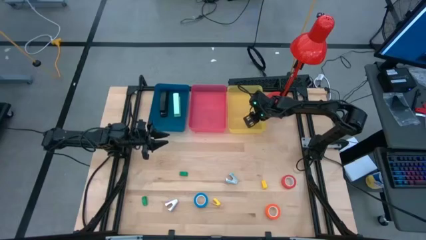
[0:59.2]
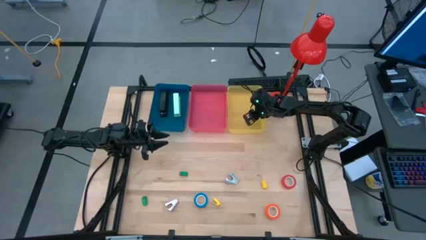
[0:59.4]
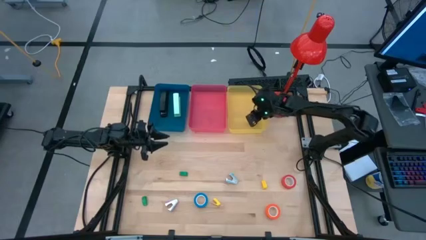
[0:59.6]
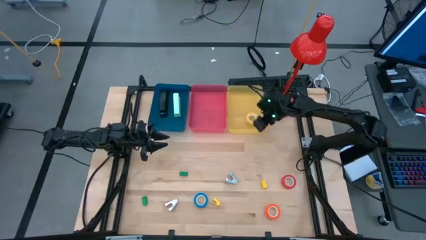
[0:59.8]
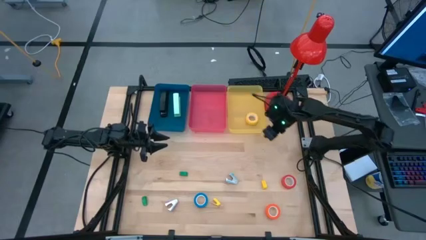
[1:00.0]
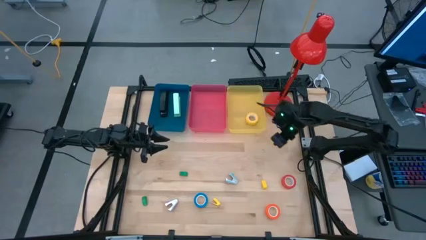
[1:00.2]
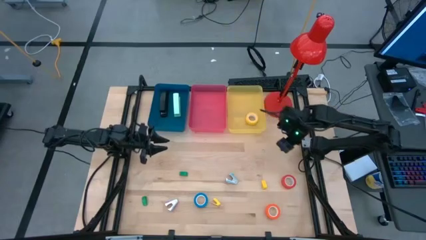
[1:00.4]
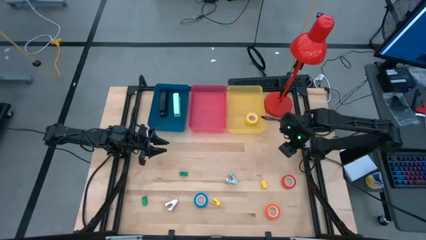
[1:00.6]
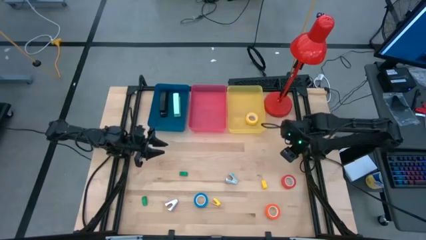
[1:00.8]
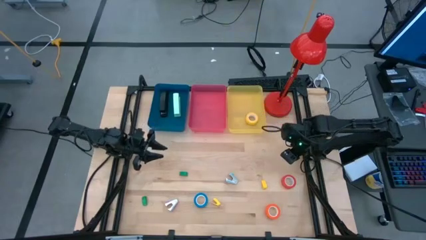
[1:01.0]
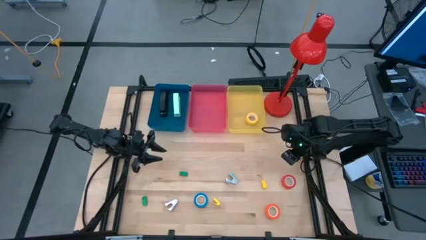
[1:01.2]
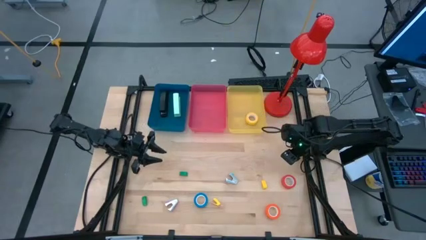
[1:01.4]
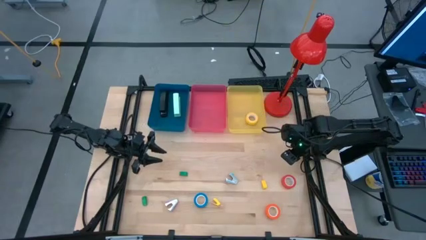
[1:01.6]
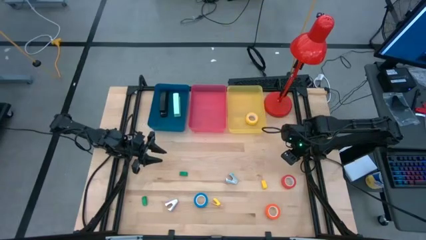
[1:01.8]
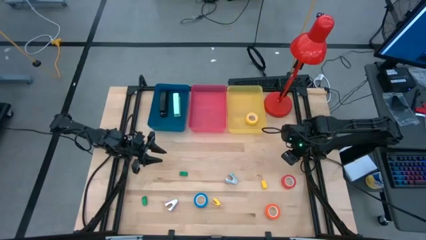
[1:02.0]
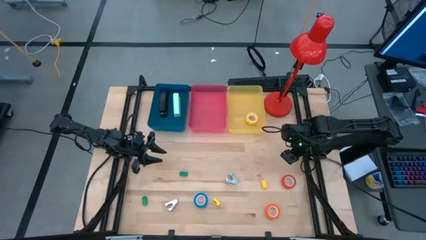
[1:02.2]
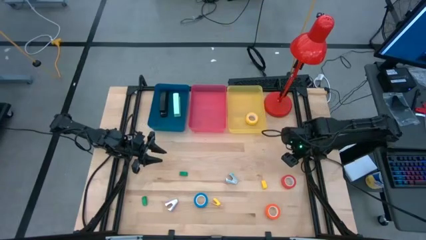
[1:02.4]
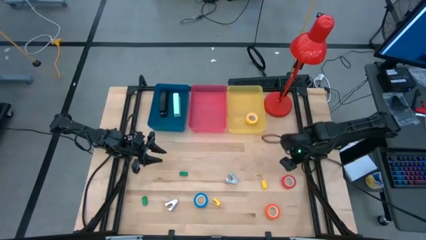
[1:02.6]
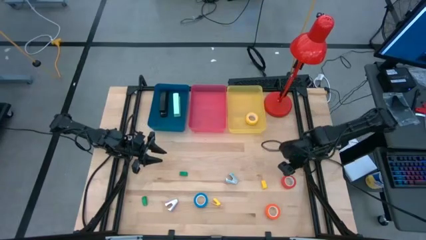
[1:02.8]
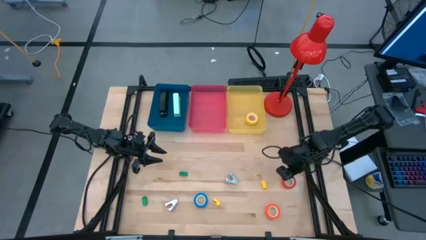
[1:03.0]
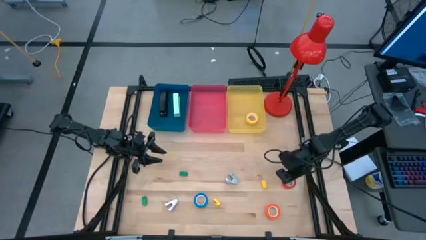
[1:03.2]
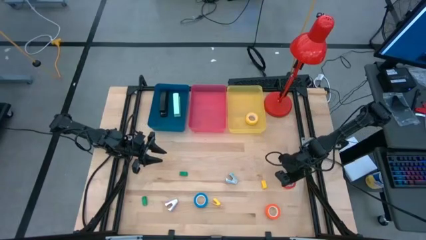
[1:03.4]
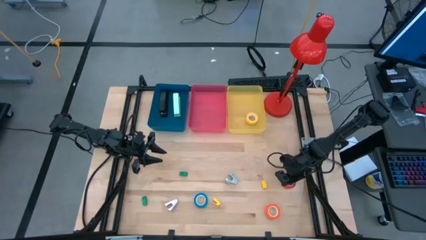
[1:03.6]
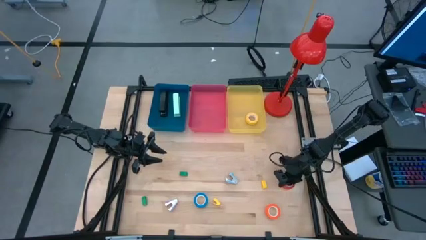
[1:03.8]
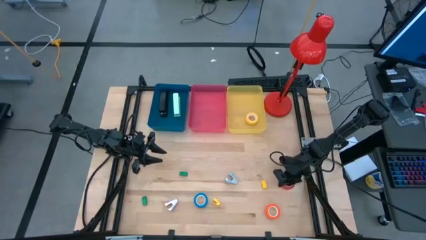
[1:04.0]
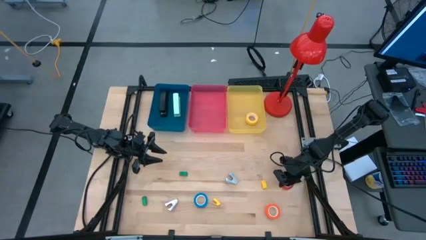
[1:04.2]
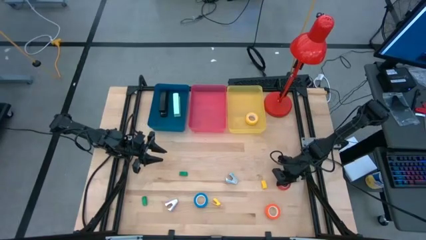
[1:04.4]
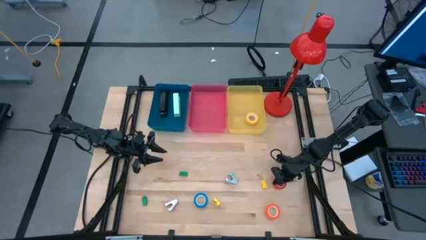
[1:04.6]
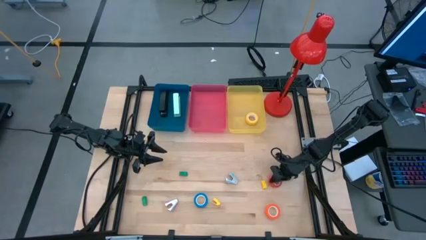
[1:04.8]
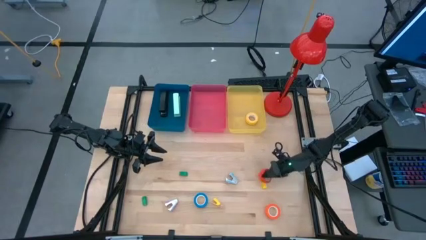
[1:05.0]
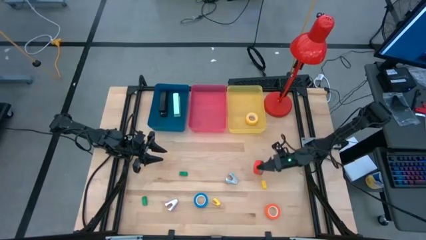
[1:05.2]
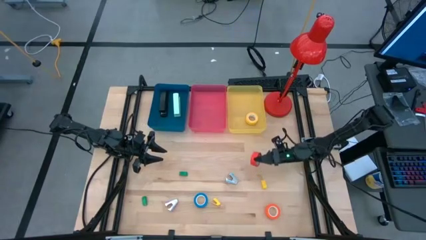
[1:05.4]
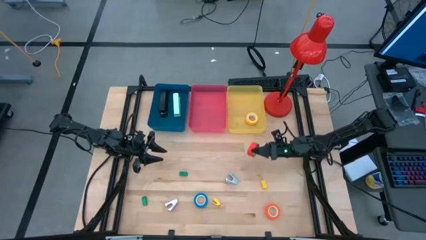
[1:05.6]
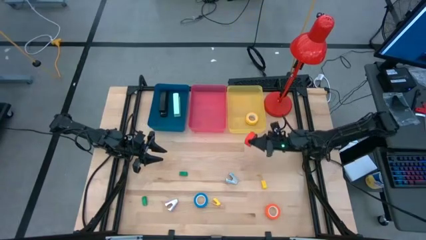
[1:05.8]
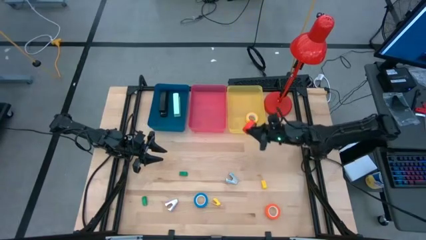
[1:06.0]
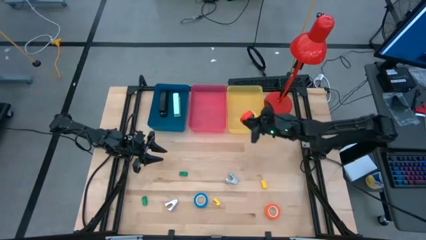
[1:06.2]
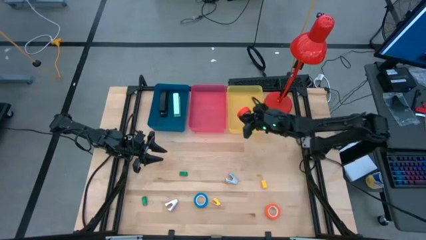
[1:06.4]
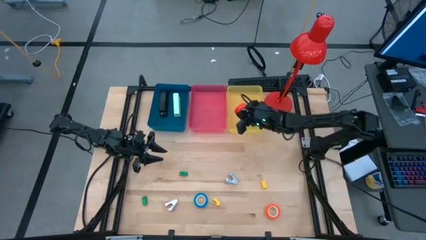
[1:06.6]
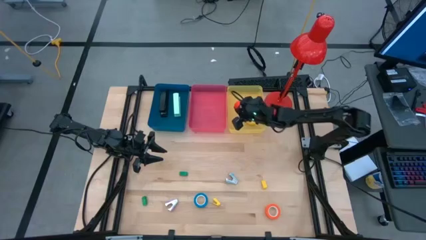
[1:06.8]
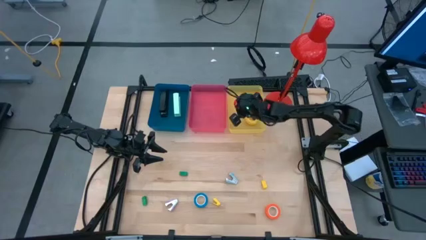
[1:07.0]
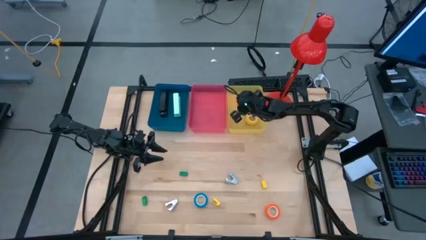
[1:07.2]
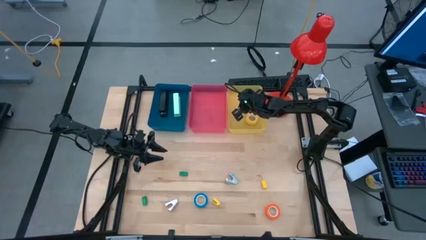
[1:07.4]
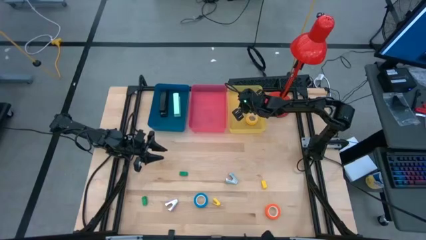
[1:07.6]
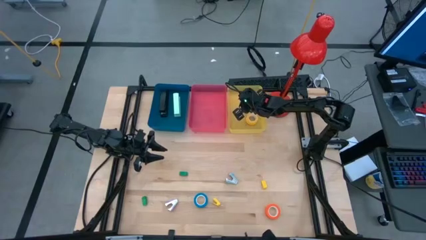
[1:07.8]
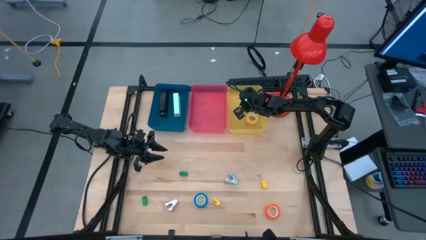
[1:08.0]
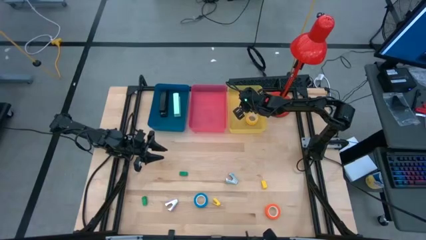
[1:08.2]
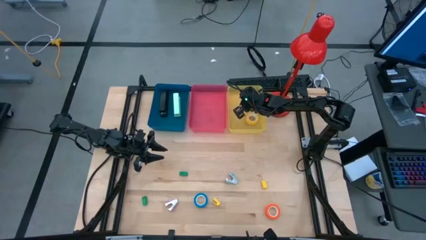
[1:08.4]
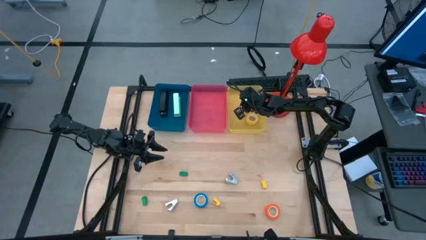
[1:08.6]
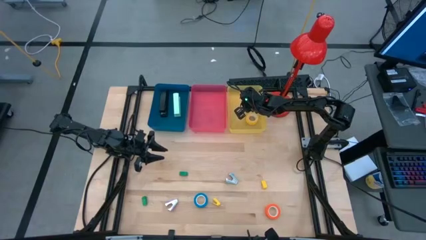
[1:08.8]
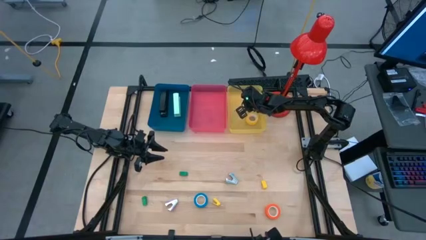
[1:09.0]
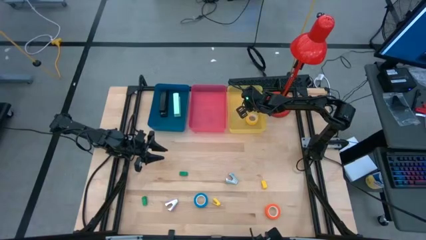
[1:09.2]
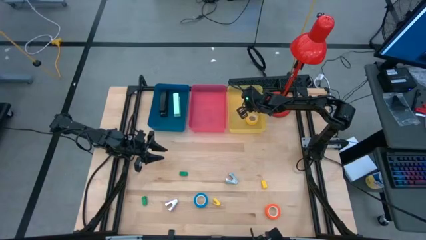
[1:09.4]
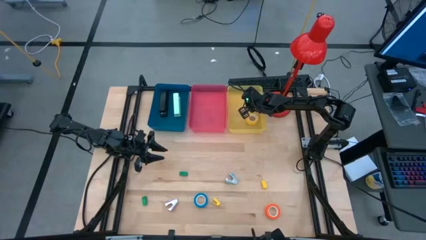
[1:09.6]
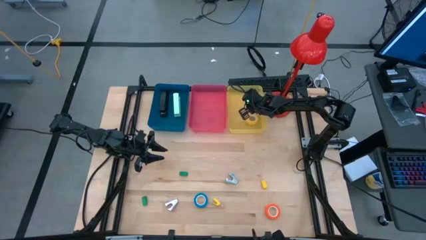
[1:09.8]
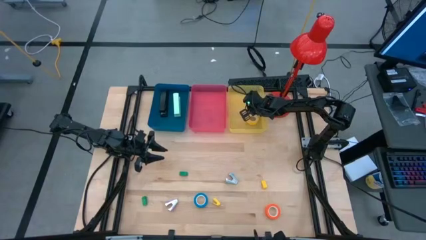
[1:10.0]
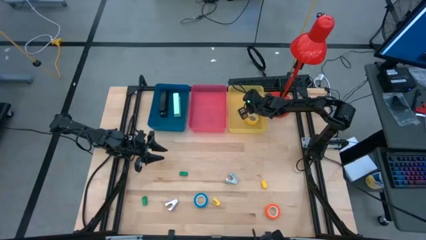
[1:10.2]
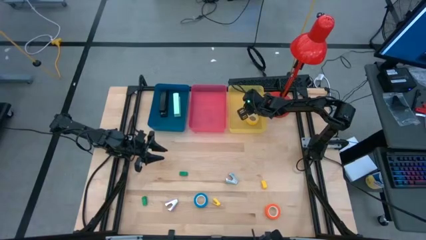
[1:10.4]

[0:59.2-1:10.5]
Task: Pick and place Stapler, Stapler remover, tape
Put the red tape into the yellow bin
